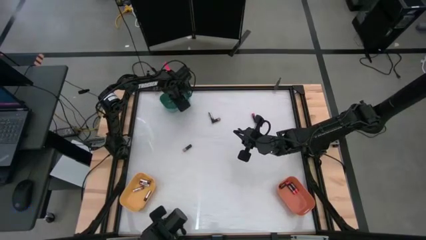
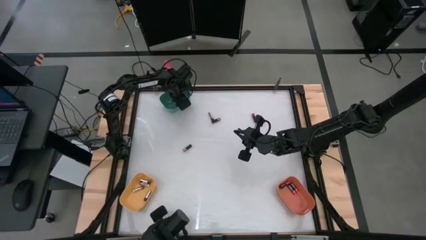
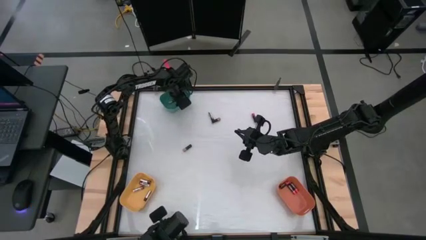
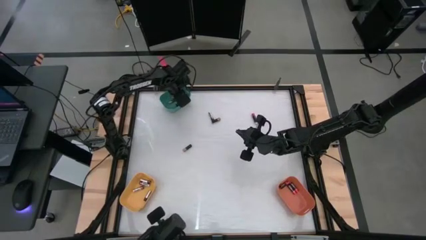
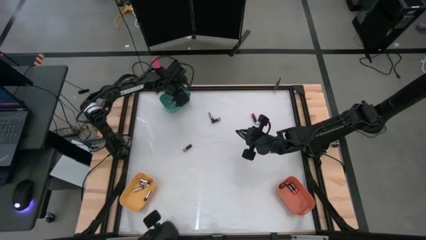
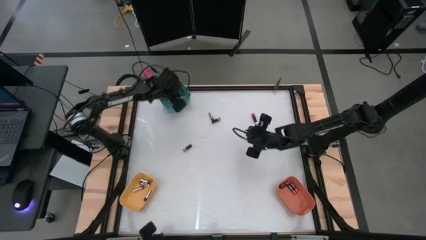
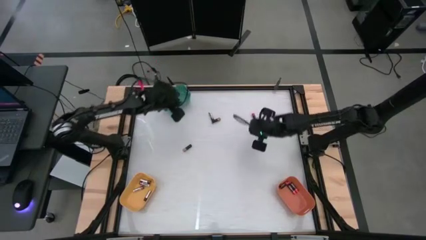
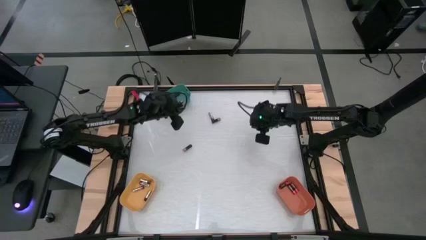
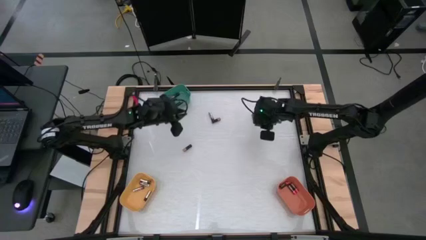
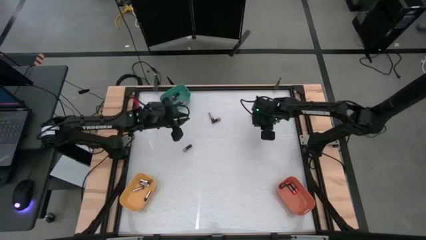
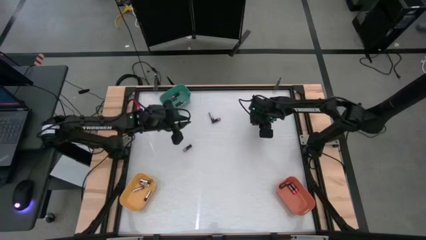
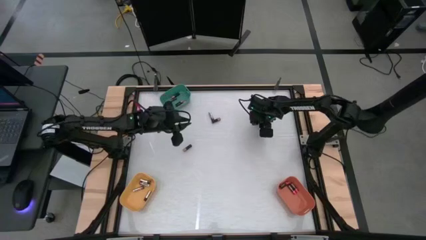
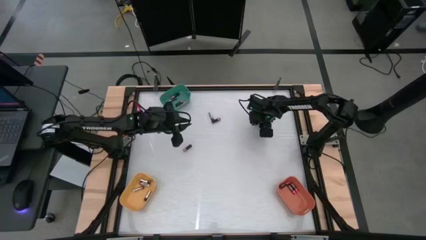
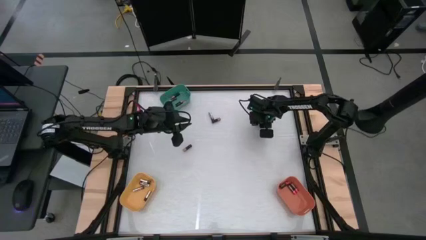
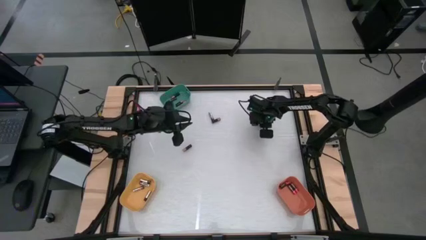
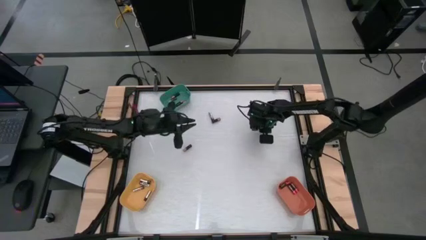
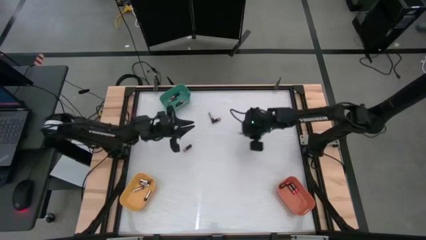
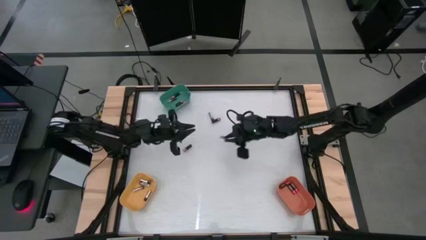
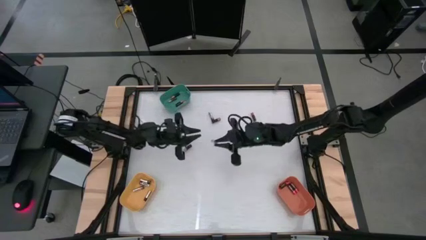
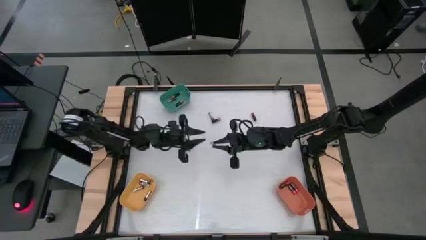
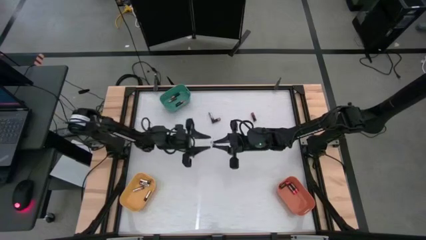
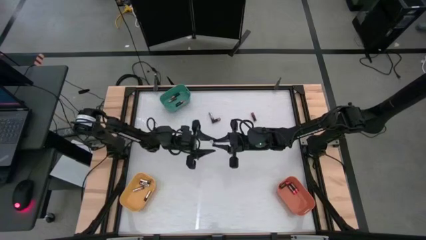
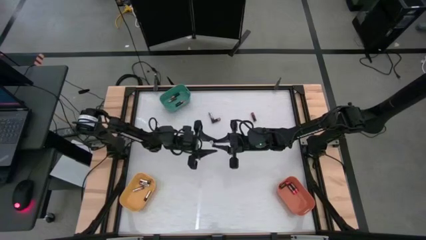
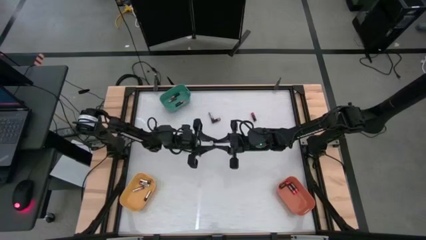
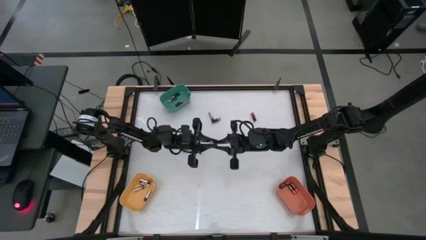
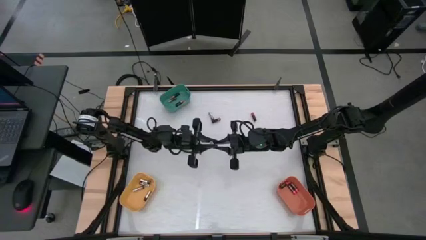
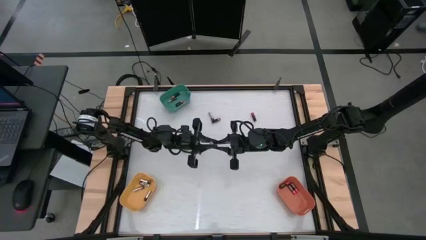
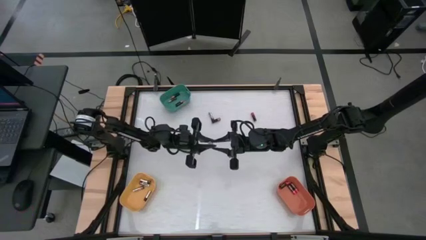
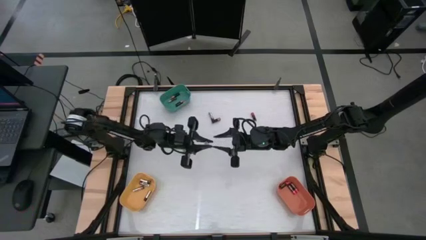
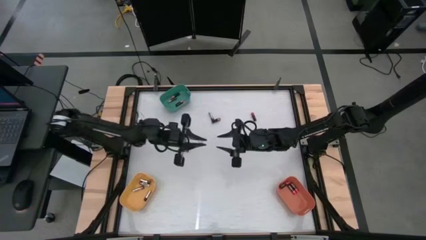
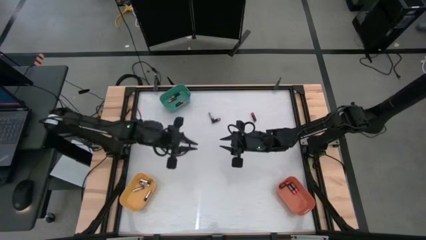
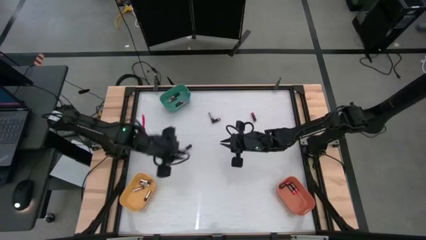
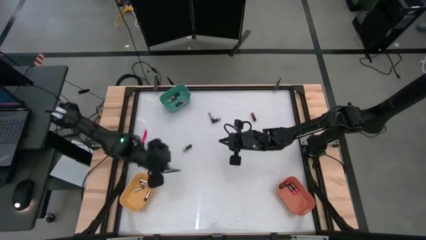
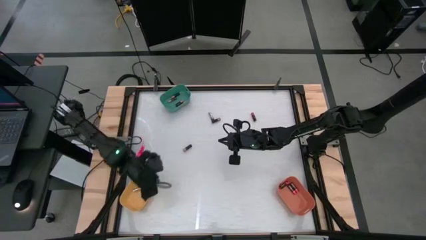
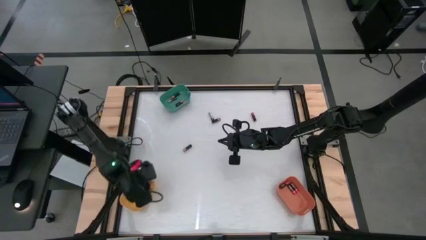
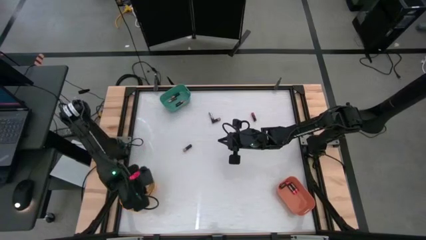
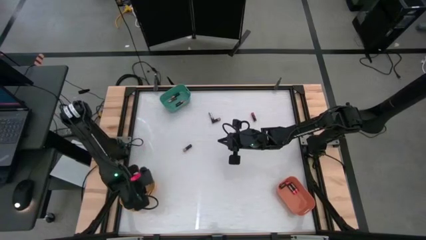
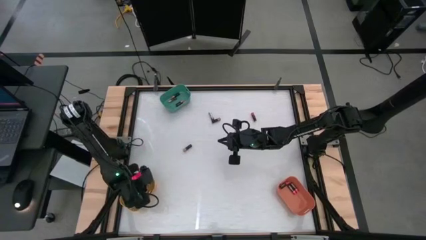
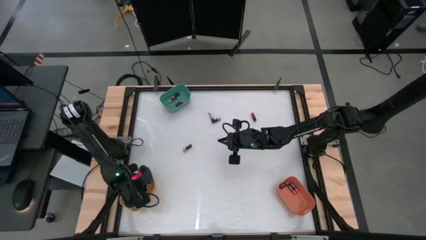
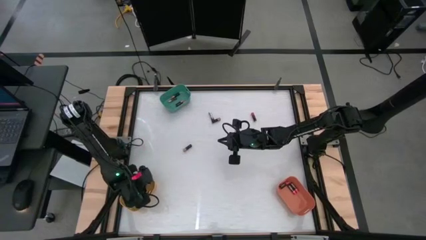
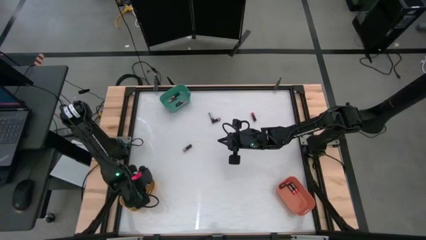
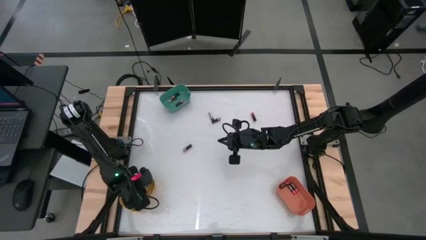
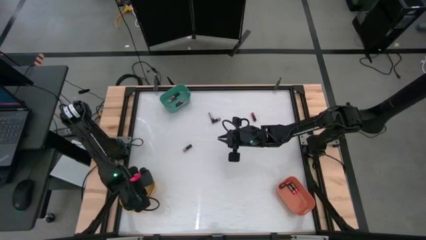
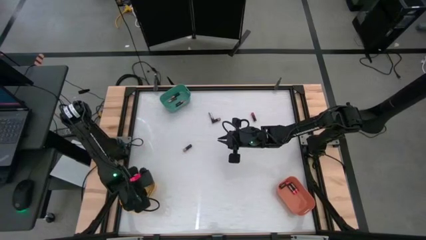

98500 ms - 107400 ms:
Task: Sort batteries
Put the silver battery into the yellow bin

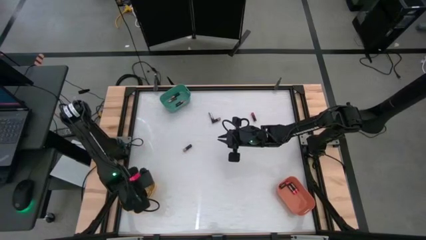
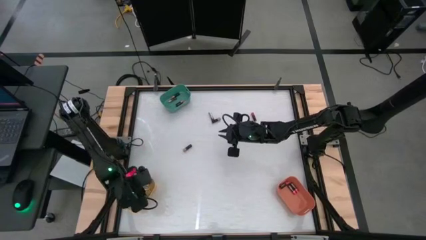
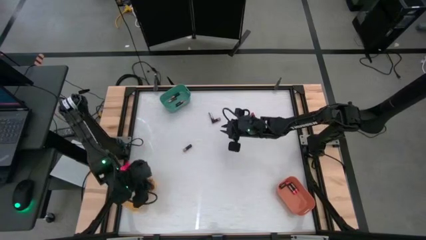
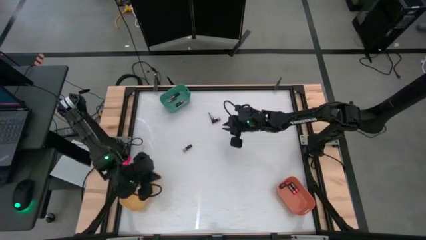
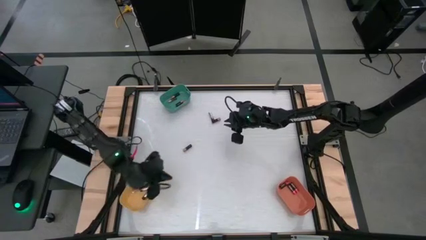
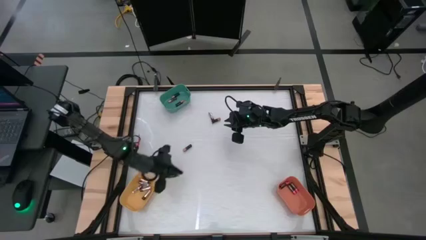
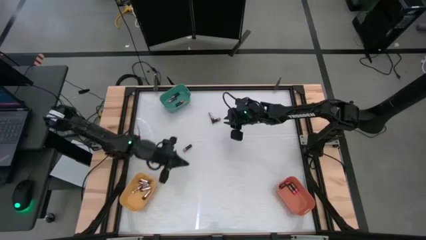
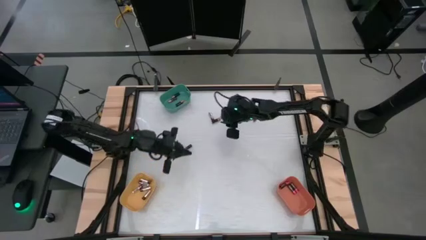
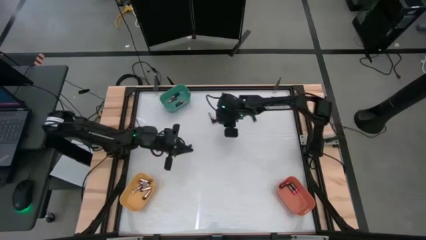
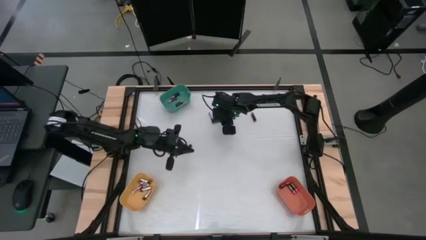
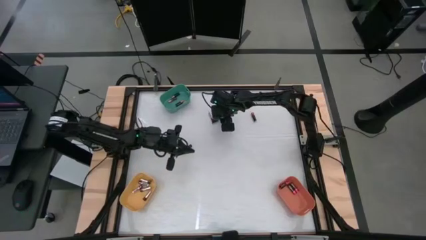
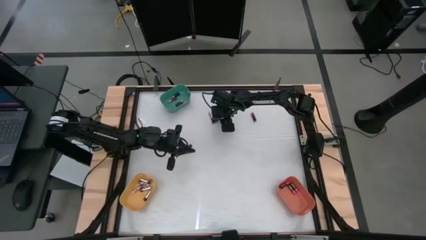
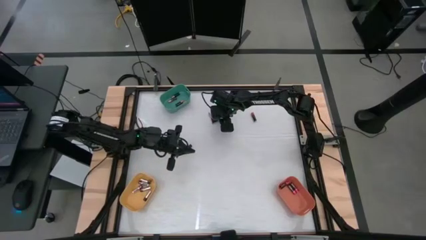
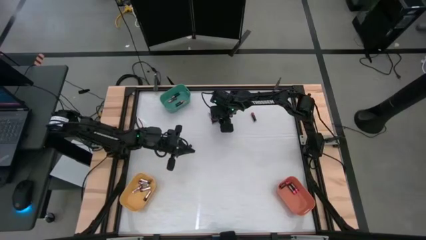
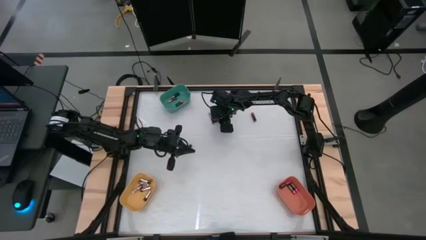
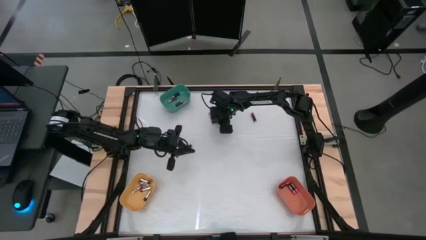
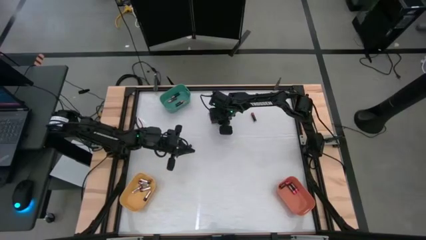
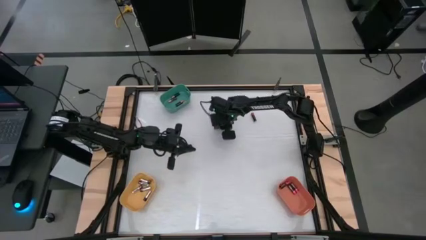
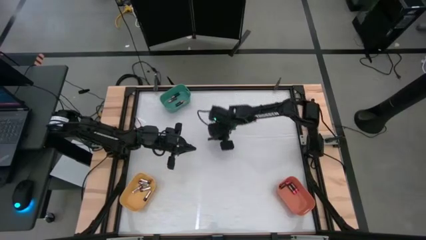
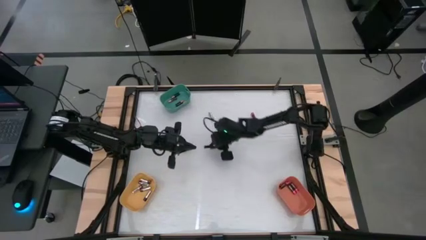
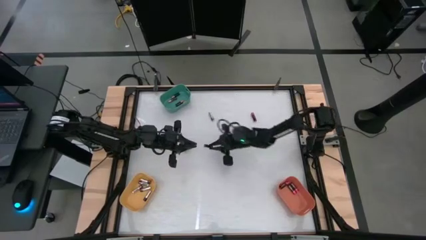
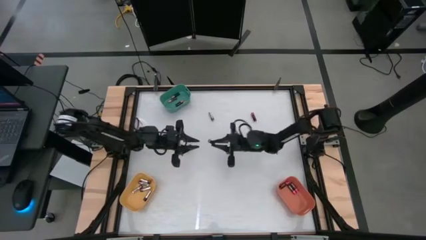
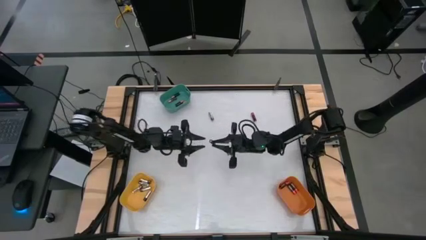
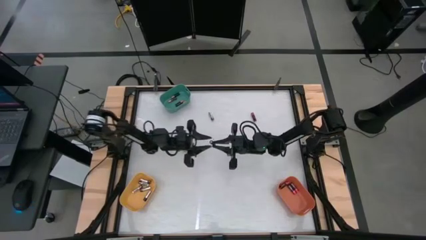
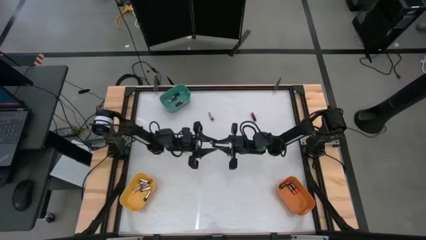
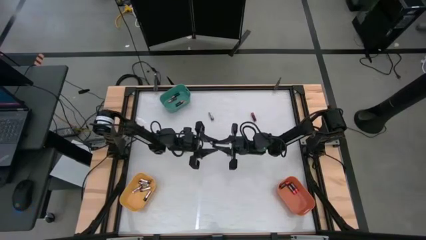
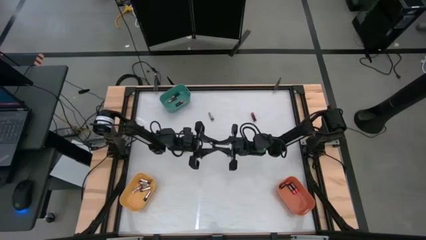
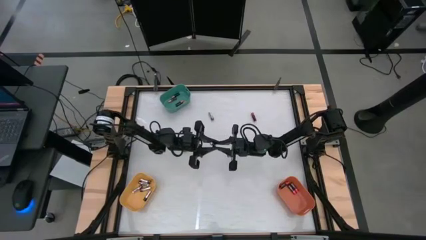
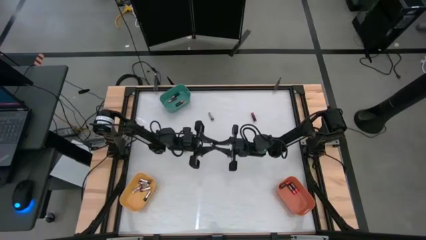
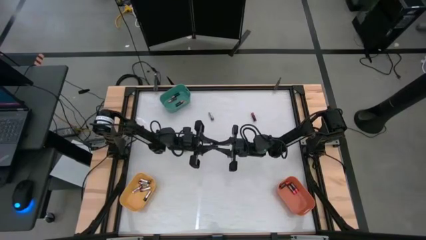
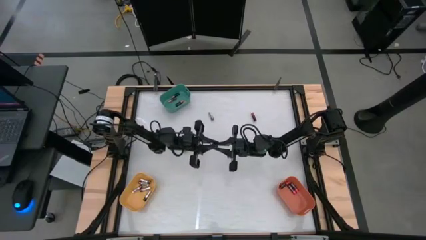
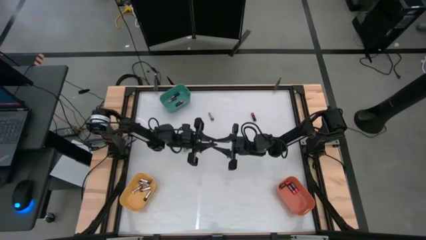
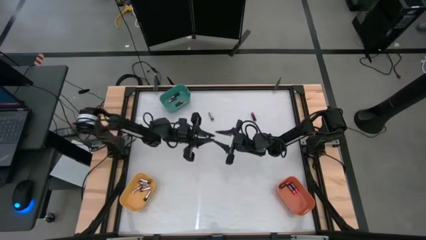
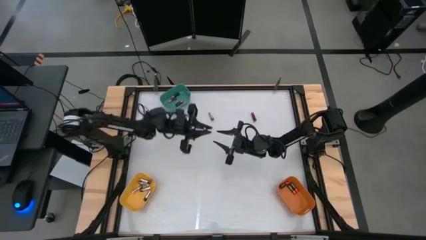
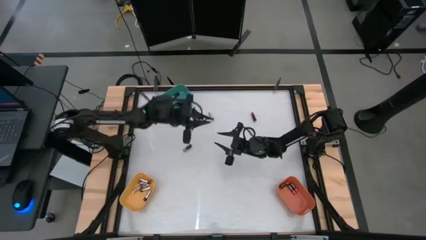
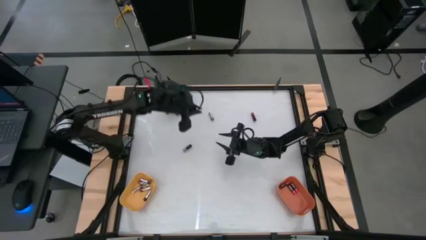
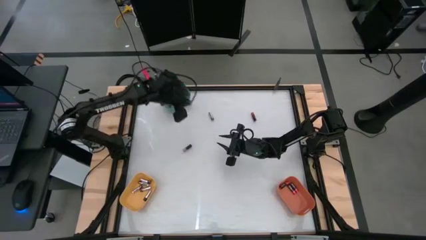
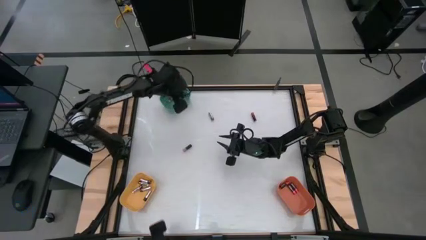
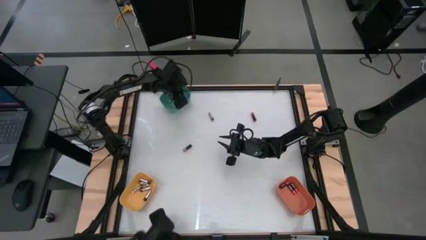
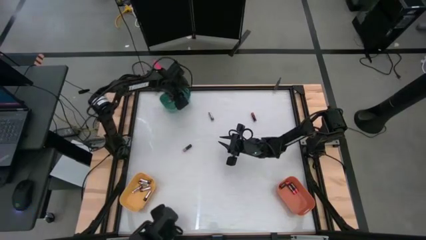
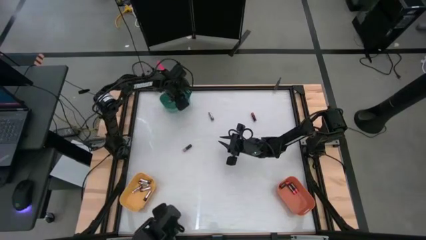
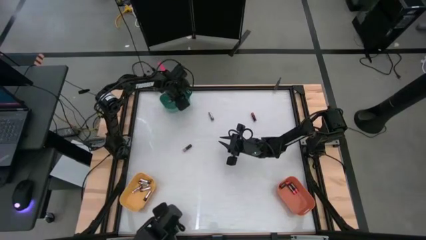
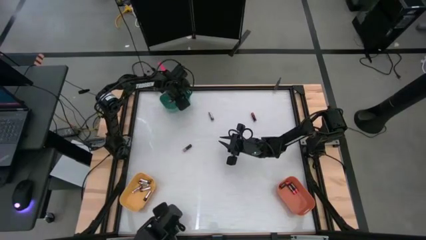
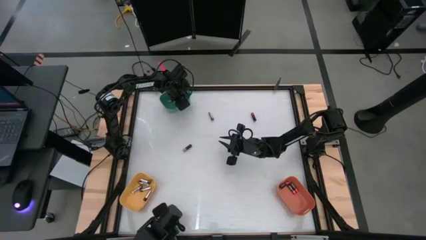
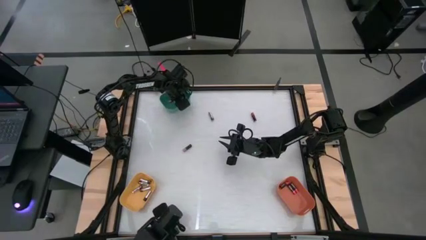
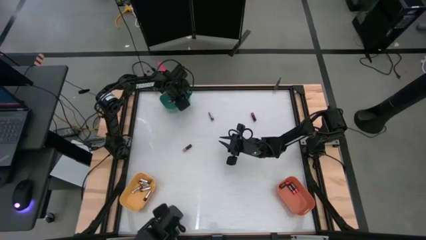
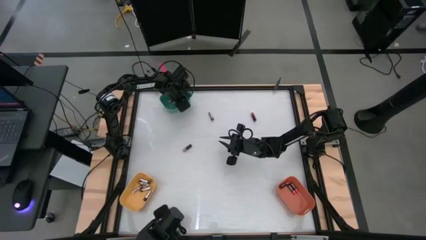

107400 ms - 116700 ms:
Put the brown battery into the green bin
